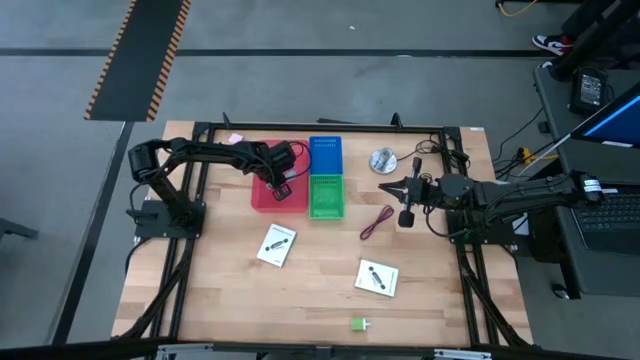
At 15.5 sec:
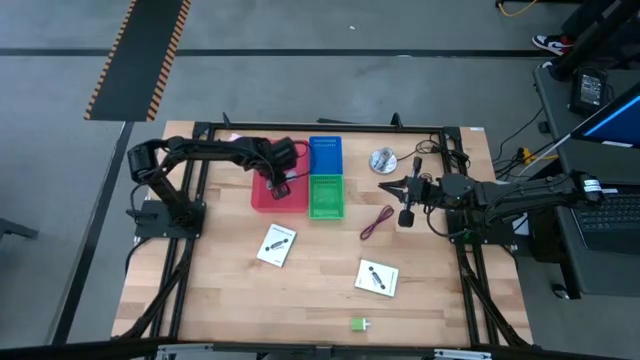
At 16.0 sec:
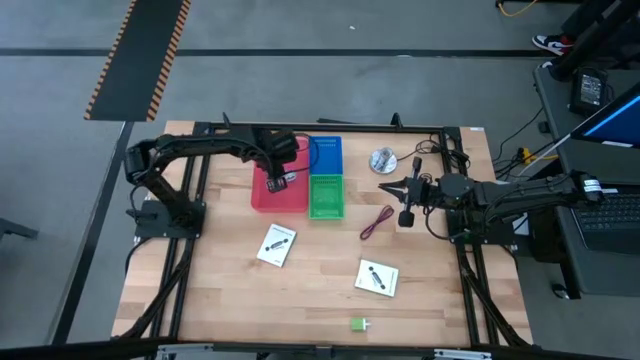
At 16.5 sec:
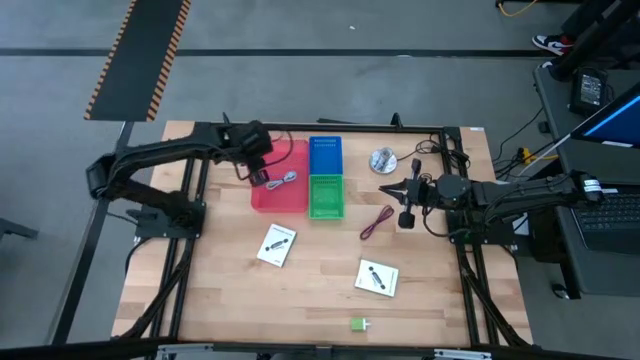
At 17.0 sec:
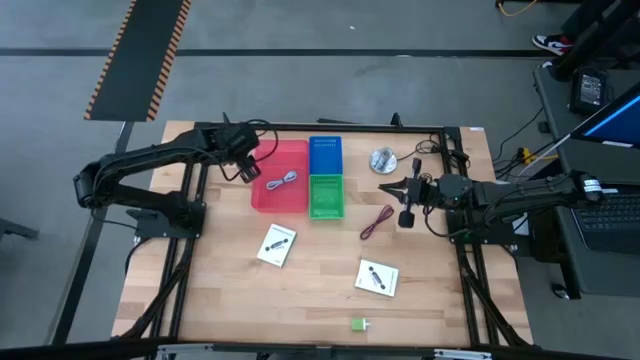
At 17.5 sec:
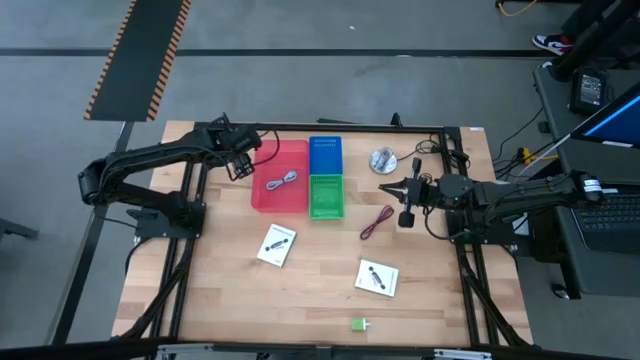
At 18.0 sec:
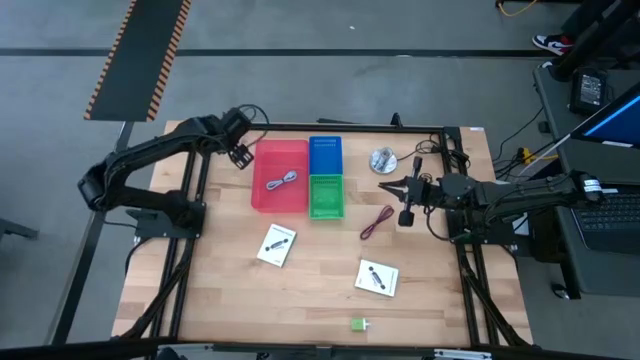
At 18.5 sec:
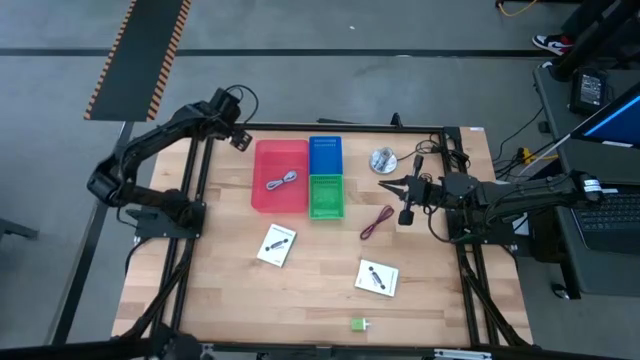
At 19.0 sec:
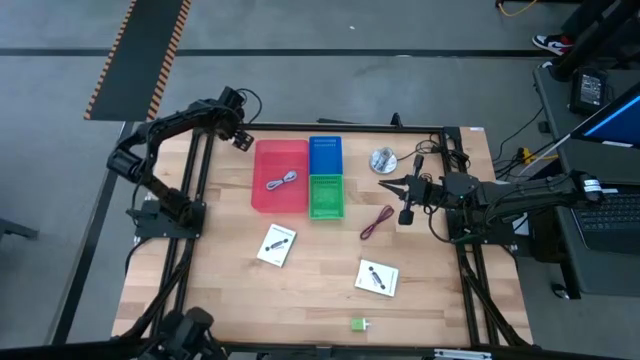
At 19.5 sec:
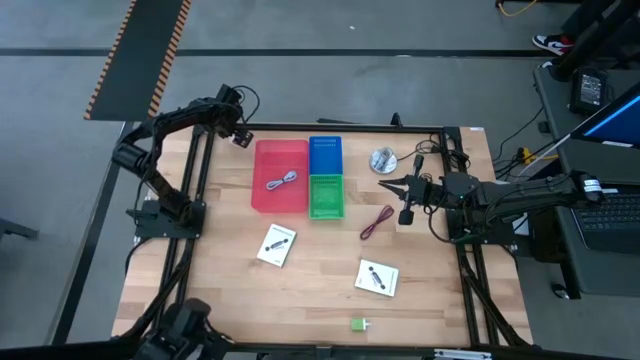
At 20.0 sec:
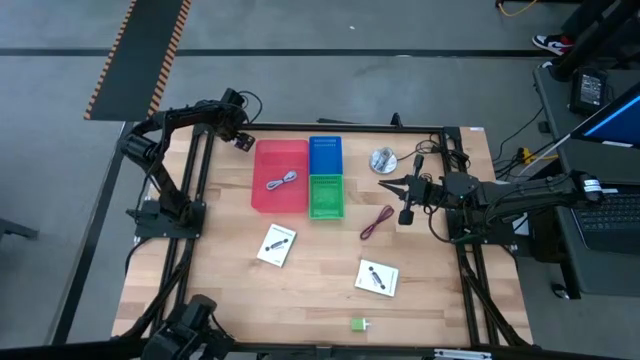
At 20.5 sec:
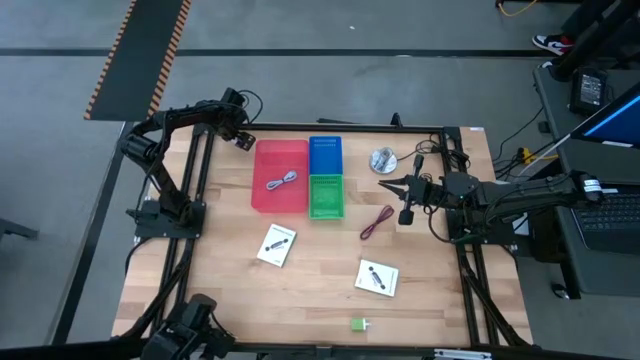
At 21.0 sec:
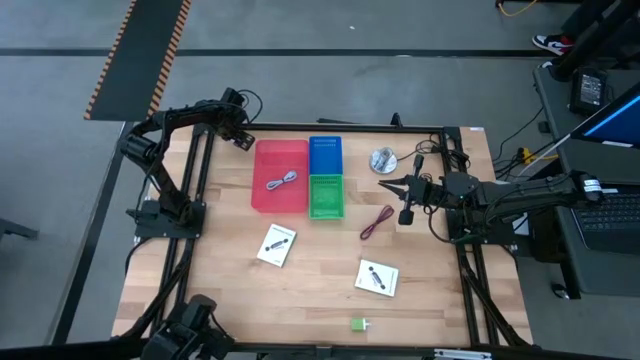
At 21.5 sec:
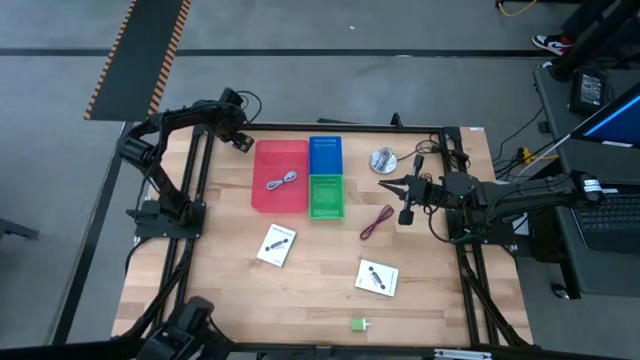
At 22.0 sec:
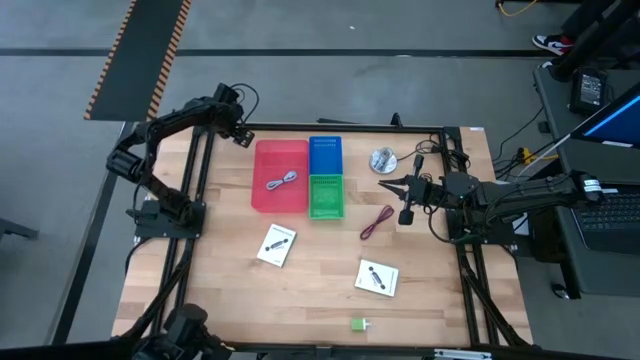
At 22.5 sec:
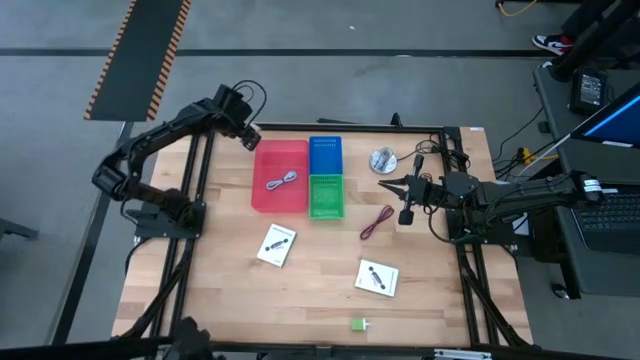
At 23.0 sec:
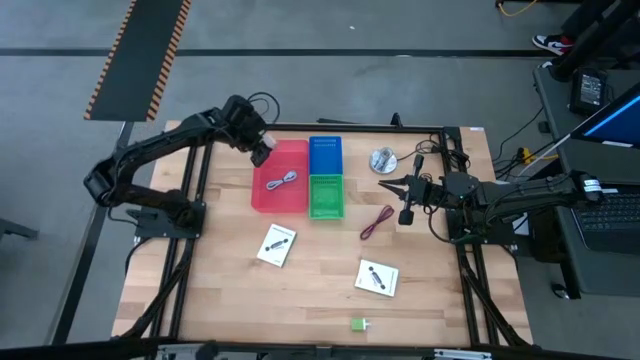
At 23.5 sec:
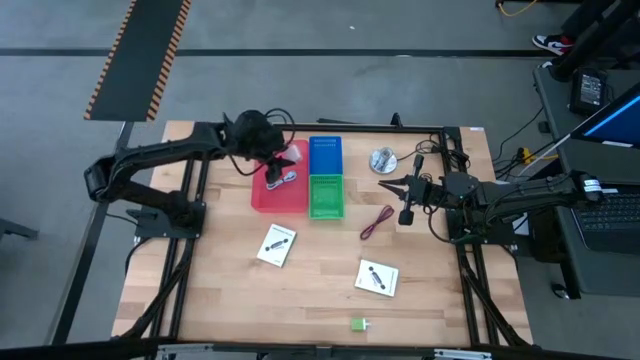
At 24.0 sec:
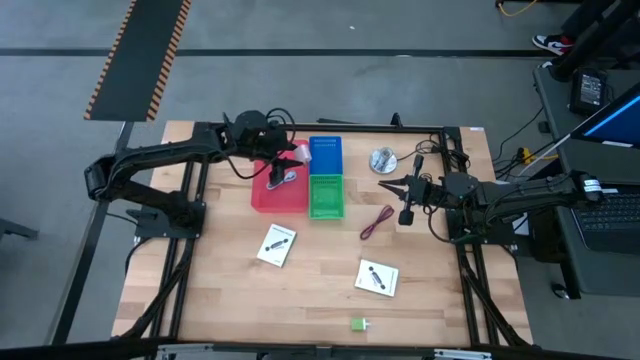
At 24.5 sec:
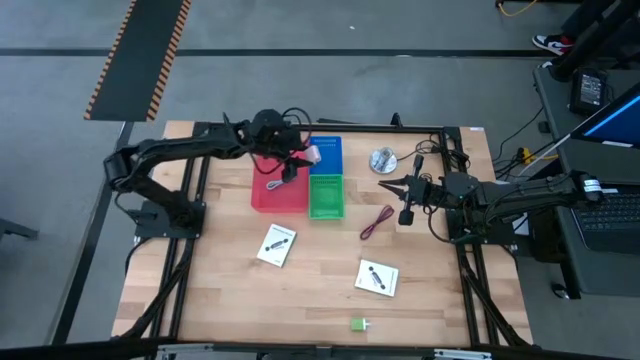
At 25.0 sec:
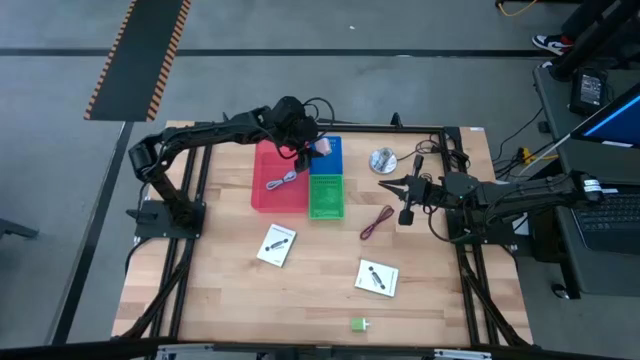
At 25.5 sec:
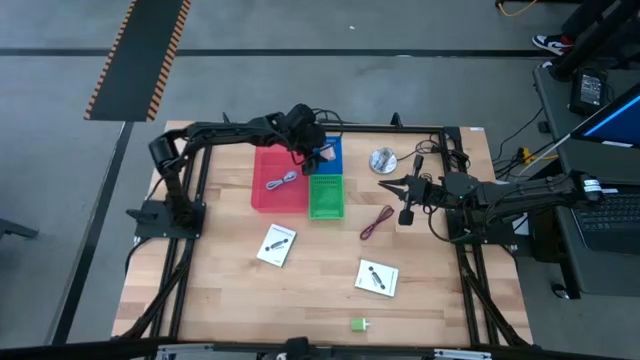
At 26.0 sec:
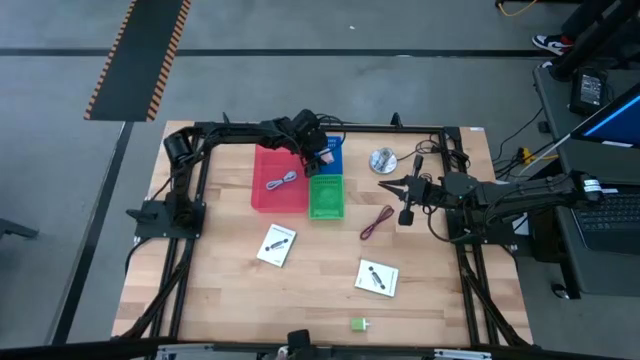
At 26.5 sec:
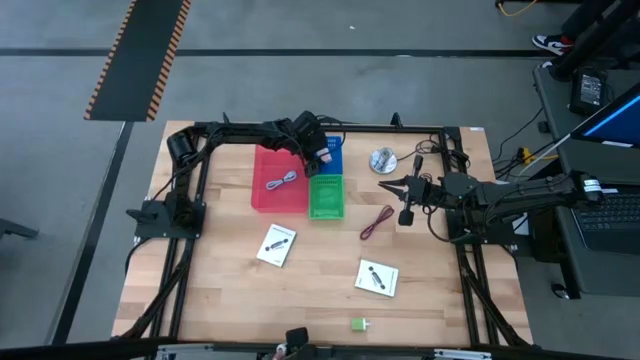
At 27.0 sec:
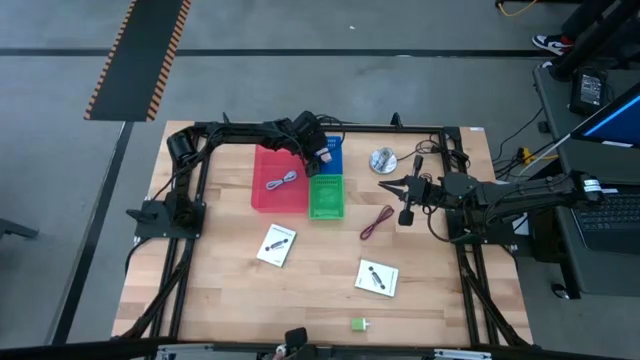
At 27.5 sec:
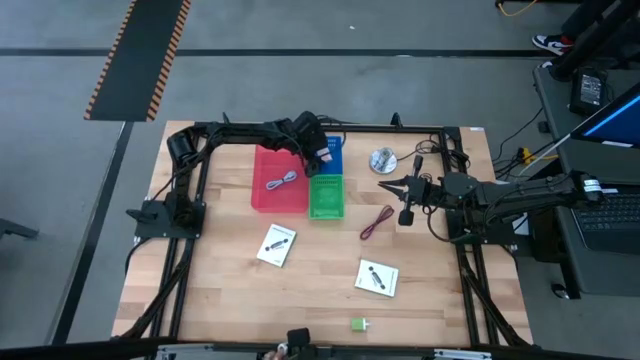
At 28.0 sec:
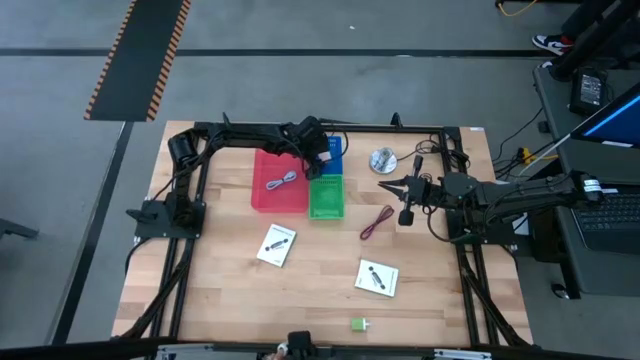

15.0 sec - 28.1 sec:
Task: Pick and place items into bin
Put the pink charger adapter into the blue bin

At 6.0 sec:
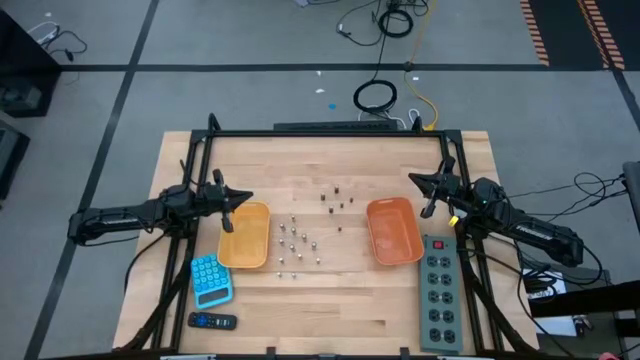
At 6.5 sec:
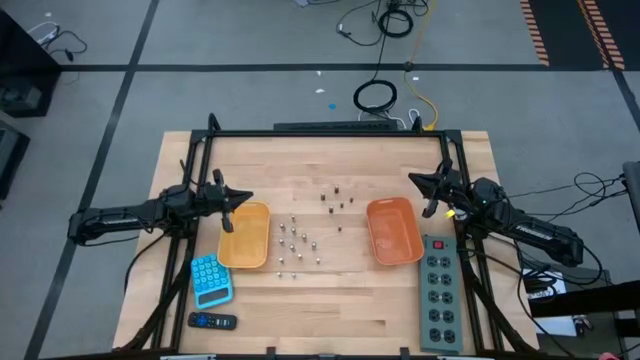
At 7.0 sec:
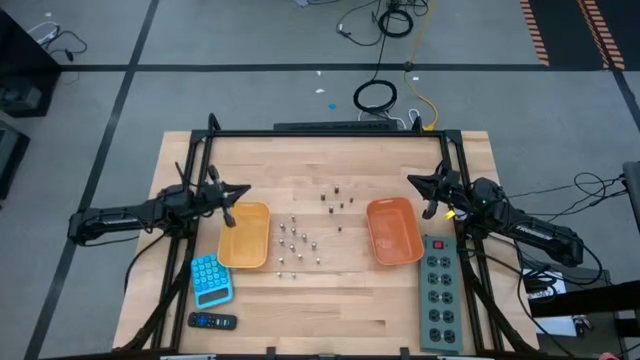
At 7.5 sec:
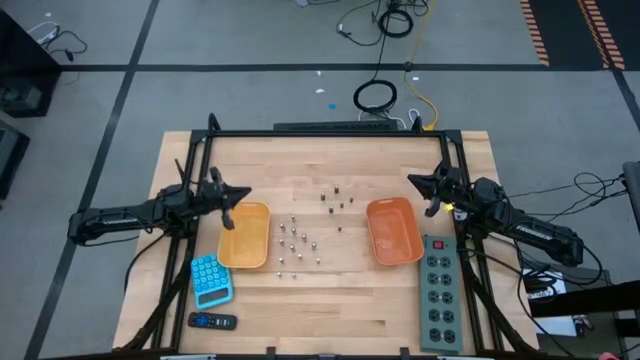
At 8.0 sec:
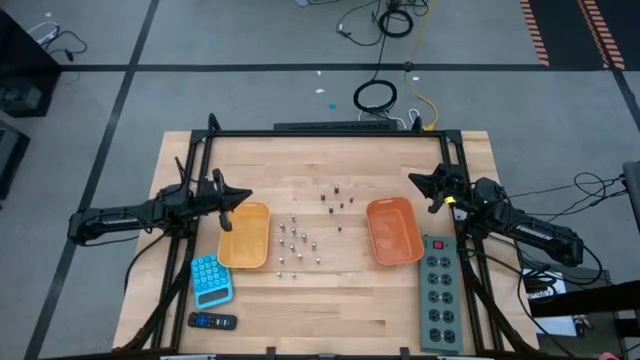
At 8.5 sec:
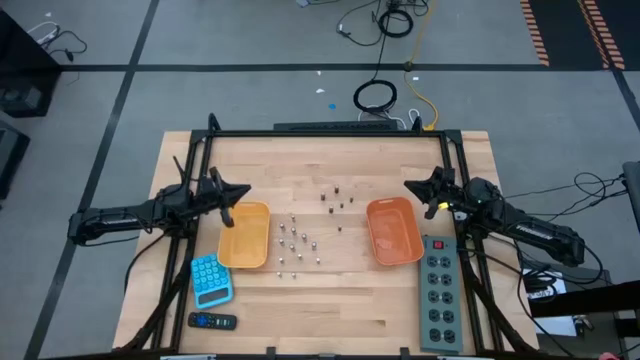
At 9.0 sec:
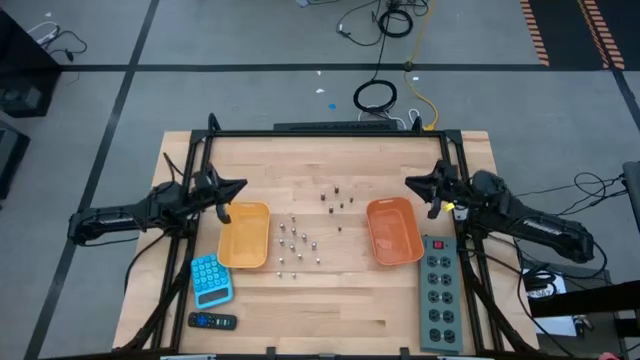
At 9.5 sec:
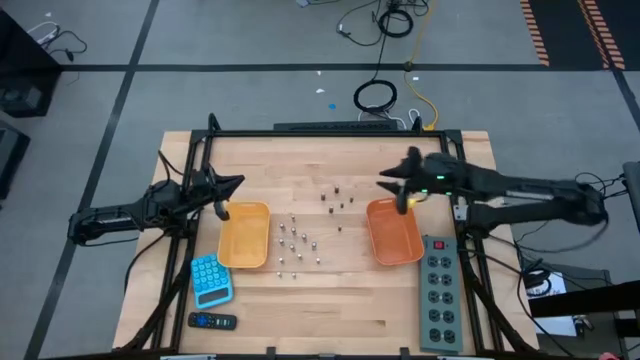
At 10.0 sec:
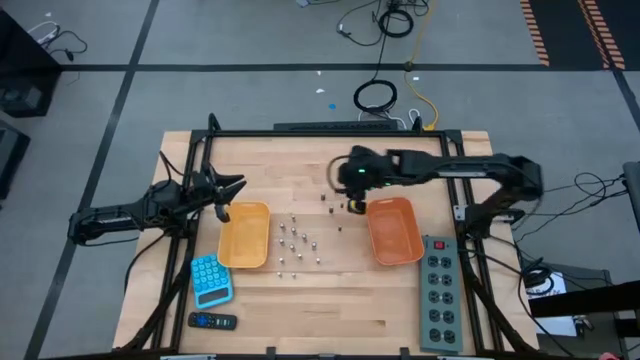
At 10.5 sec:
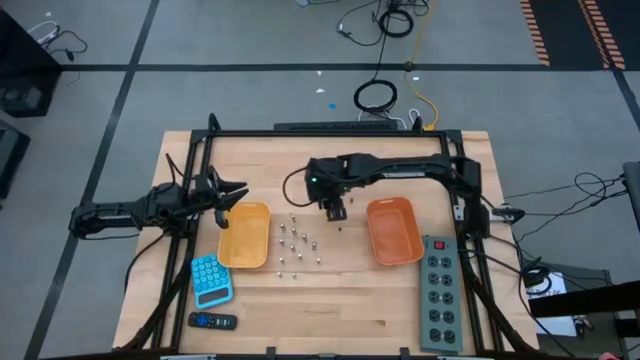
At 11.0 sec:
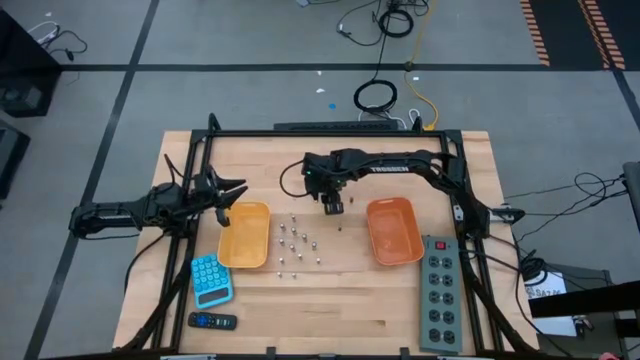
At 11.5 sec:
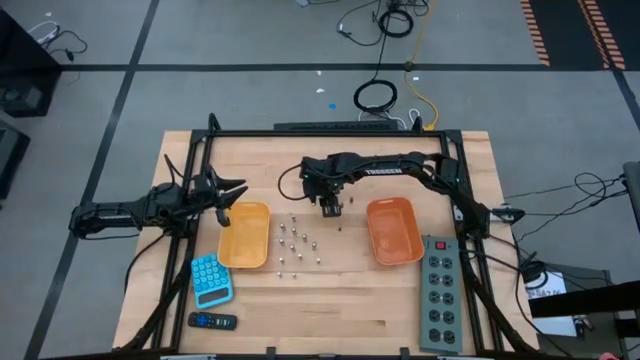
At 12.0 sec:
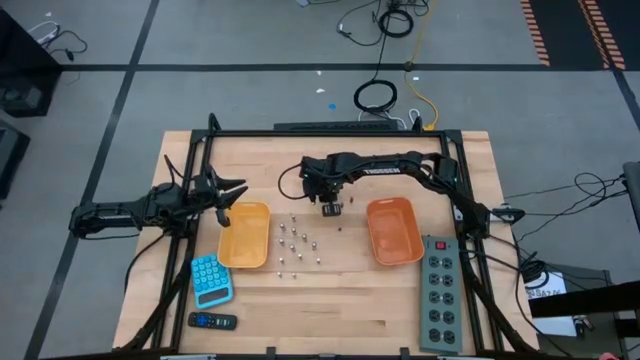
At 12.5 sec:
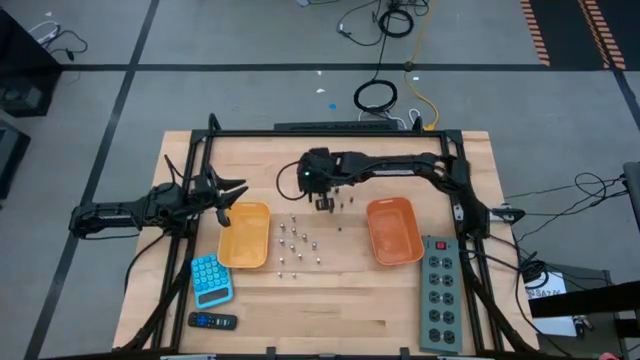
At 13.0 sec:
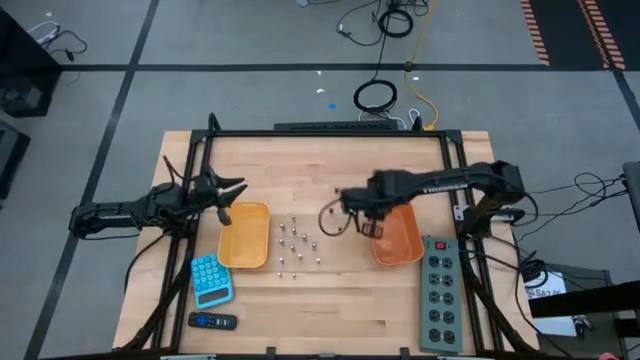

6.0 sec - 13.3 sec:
Task: Sort batteries
Put the black battery into the orange bin

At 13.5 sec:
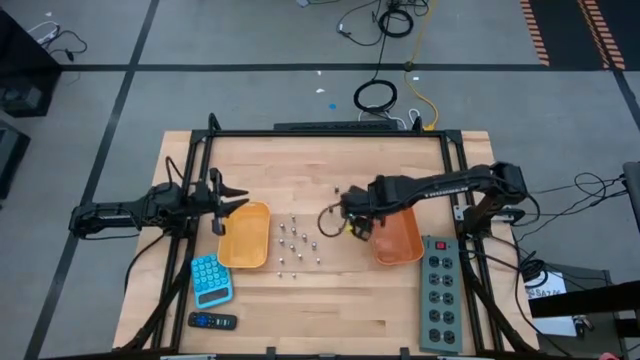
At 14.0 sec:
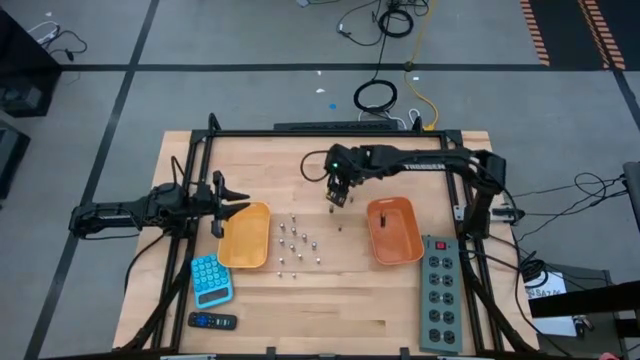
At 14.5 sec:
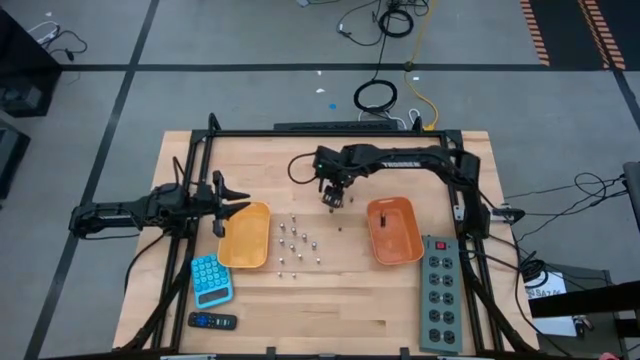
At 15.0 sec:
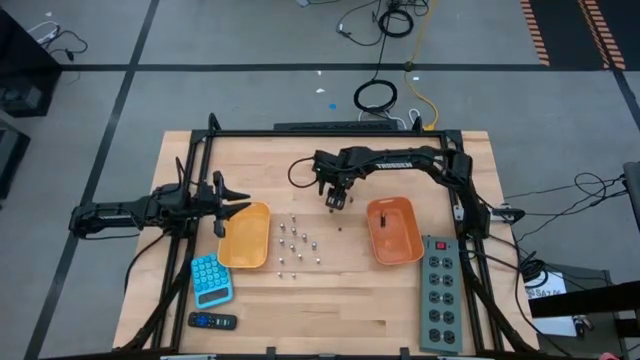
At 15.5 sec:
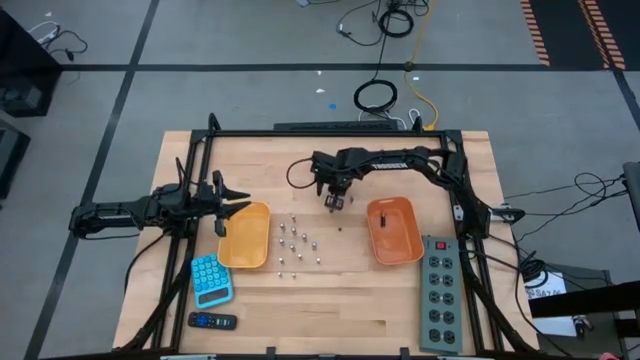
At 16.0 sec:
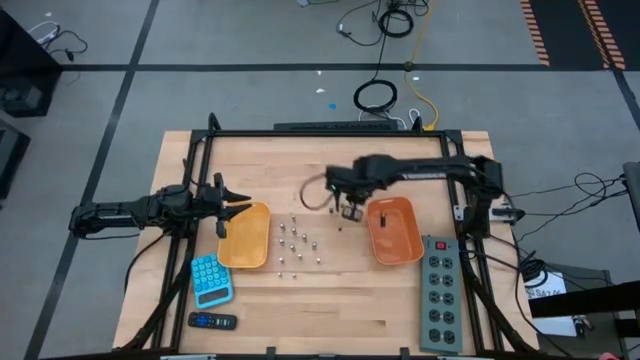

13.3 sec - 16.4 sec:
Put the black battery into the orange bin
